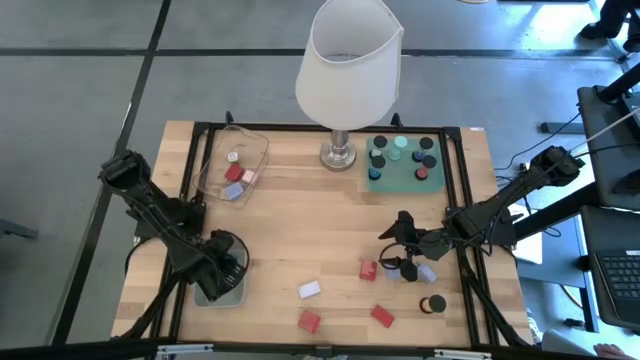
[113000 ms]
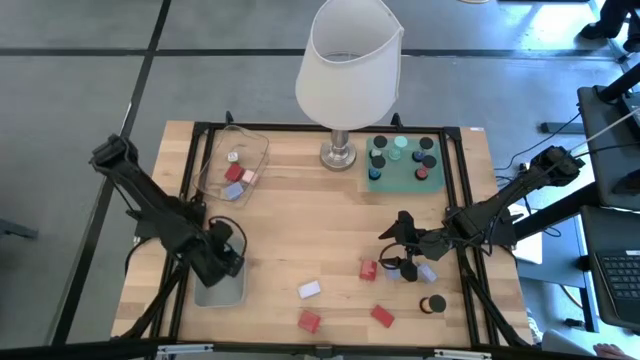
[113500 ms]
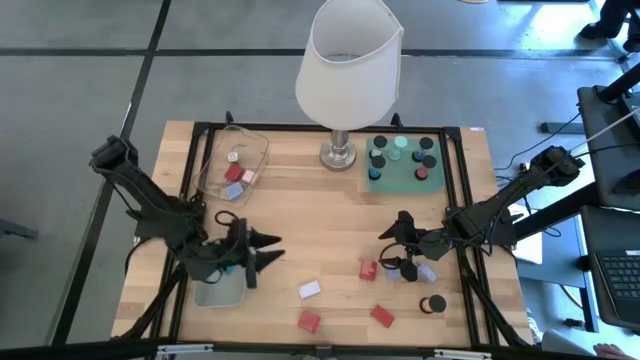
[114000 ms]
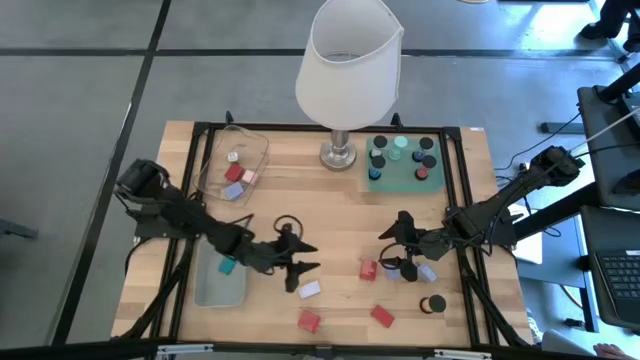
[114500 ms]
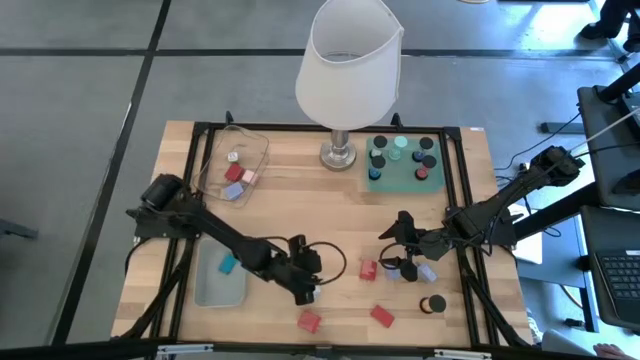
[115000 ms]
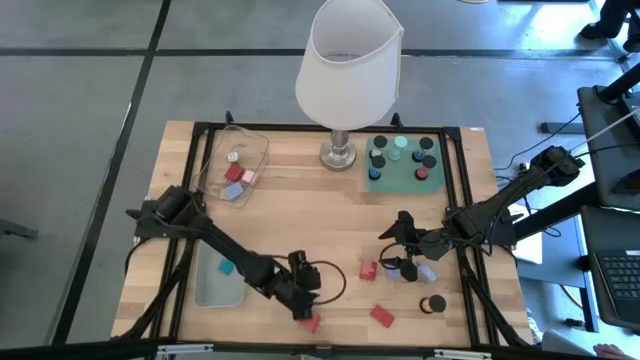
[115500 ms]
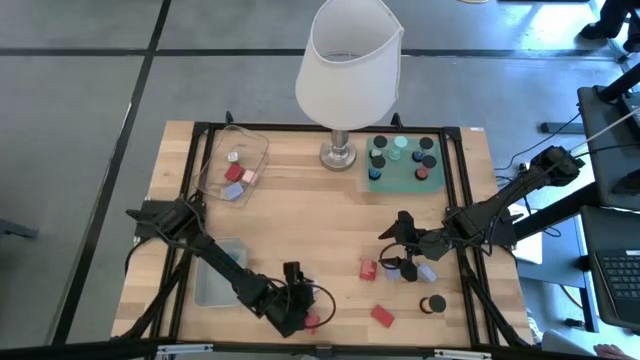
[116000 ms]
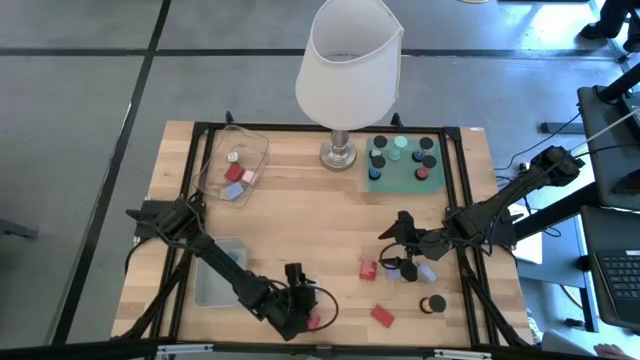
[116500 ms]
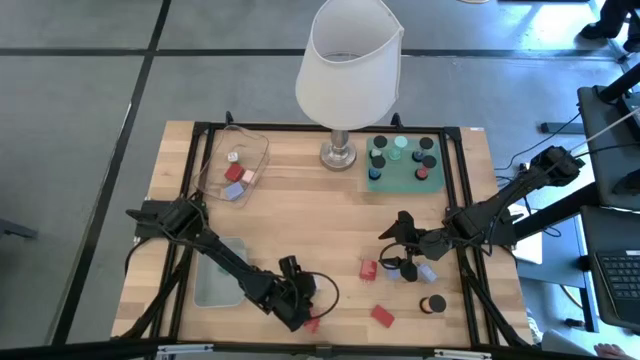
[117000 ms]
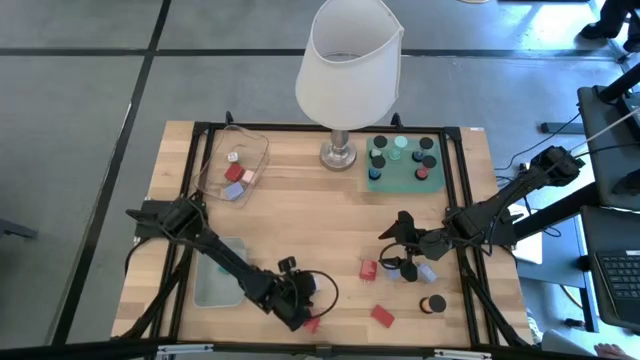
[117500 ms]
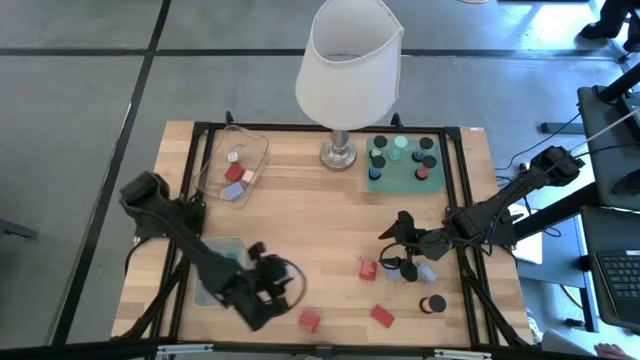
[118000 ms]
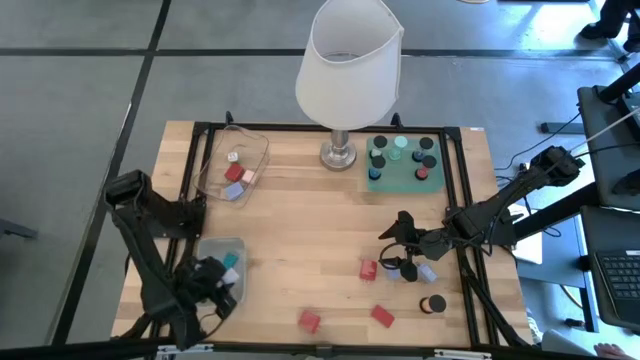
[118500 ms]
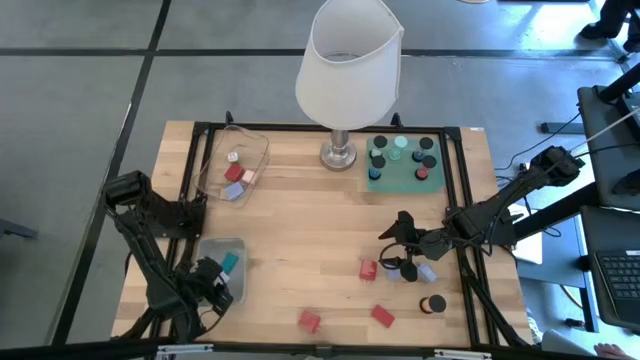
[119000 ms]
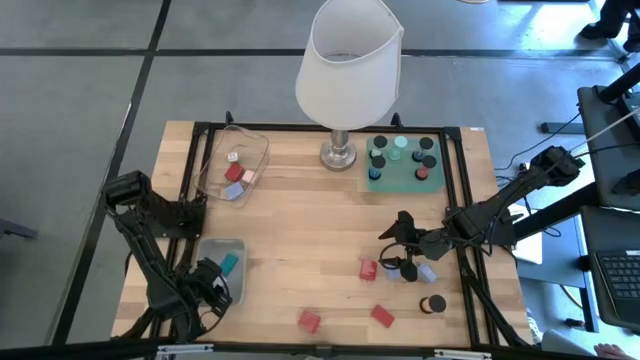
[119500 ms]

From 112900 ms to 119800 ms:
Task: Pick & Place Office items
Put the light blue digital timer into the gray bin

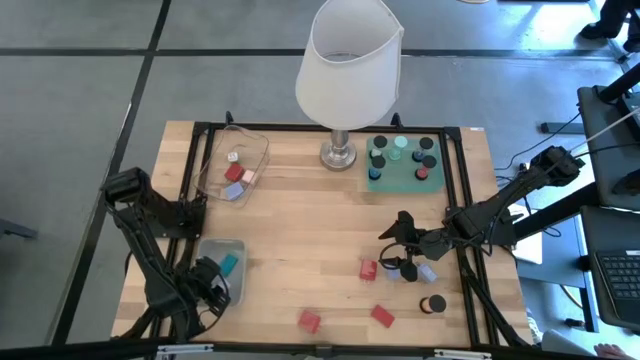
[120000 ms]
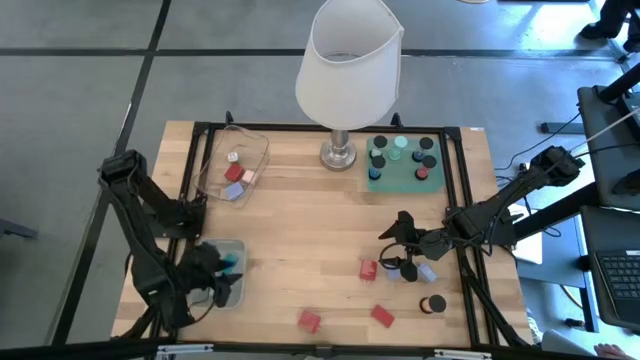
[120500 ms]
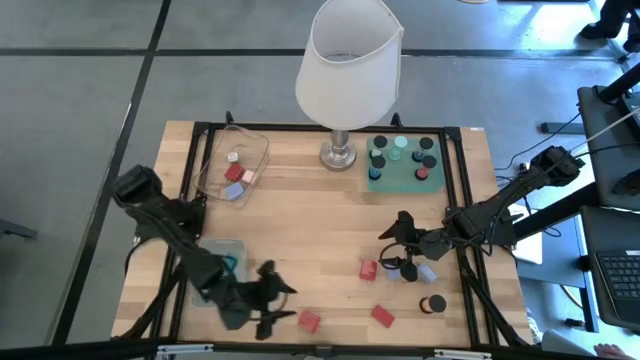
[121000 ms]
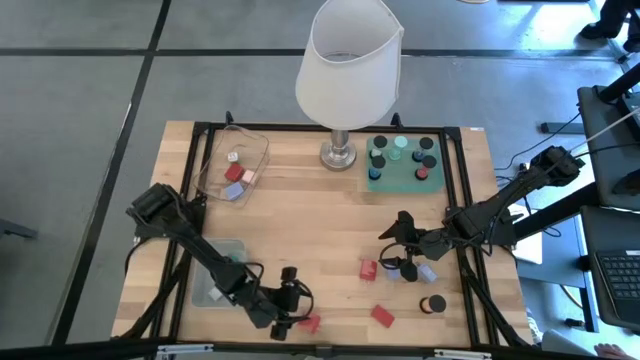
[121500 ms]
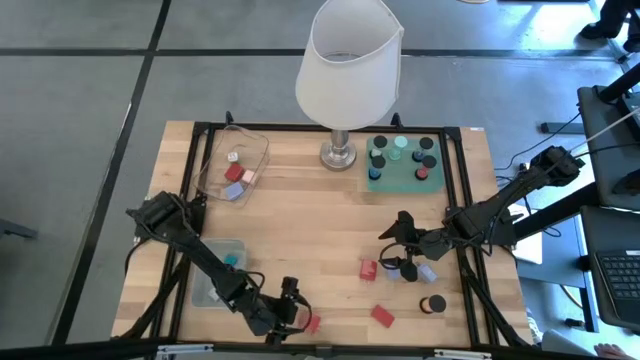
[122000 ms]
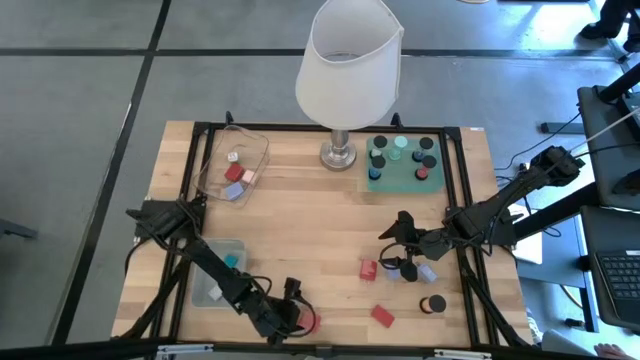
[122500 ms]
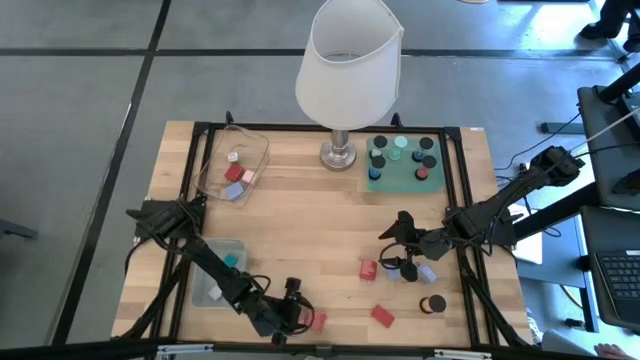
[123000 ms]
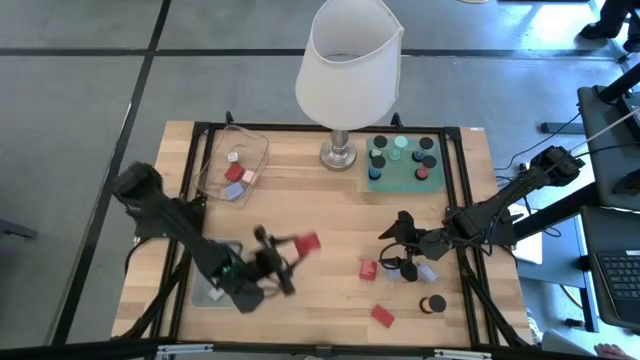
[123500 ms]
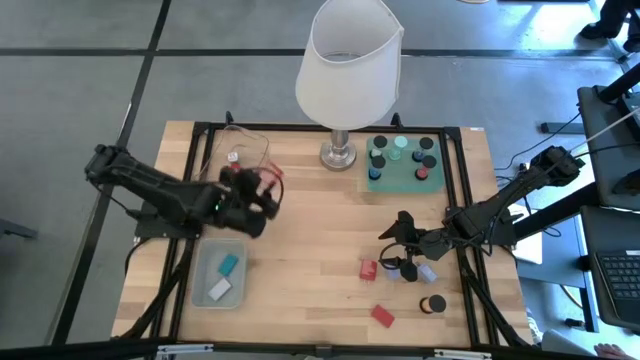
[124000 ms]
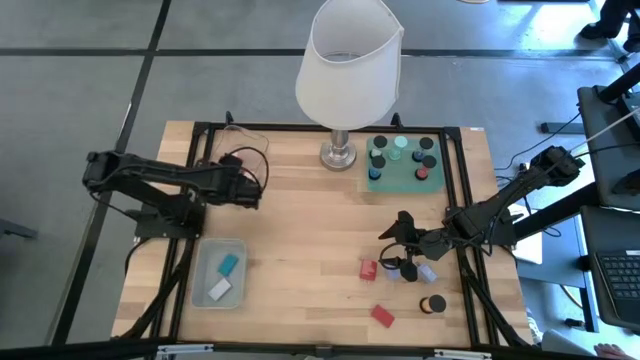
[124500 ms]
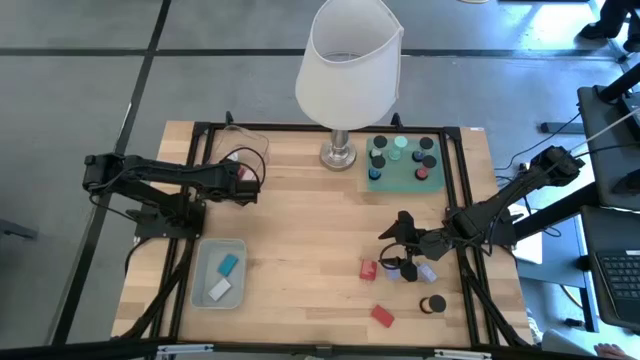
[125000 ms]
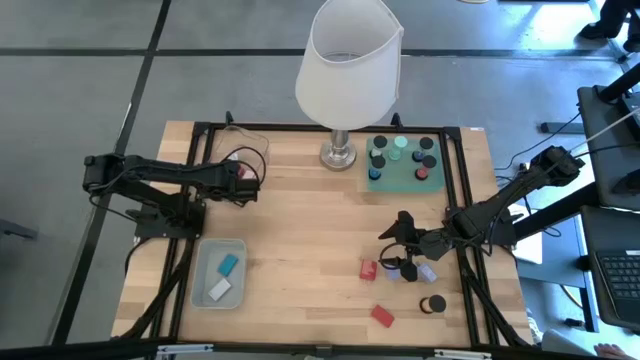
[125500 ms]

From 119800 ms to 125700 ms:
Put the red charger adapter into the transparent bin

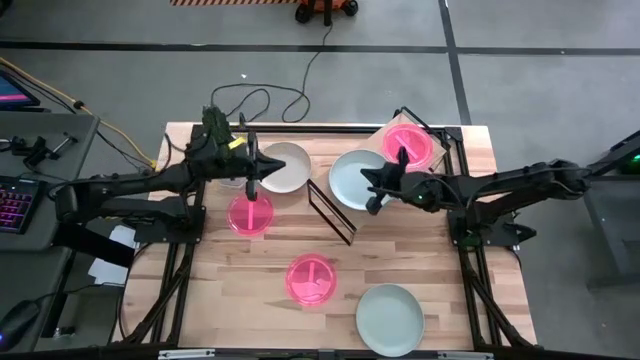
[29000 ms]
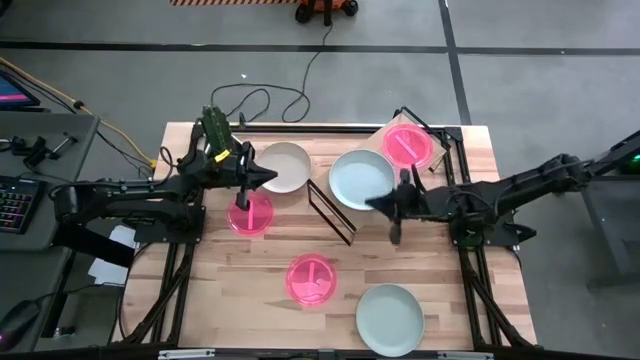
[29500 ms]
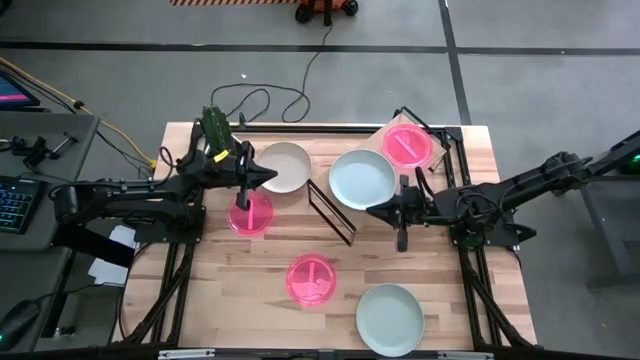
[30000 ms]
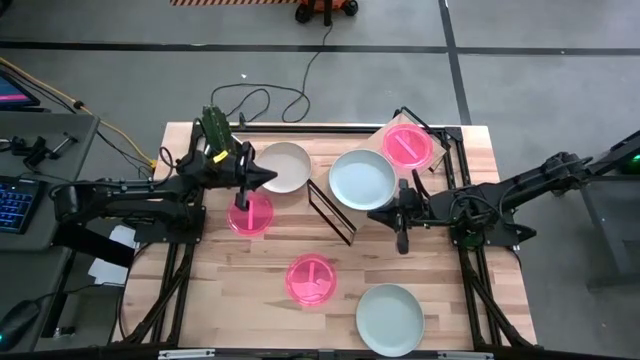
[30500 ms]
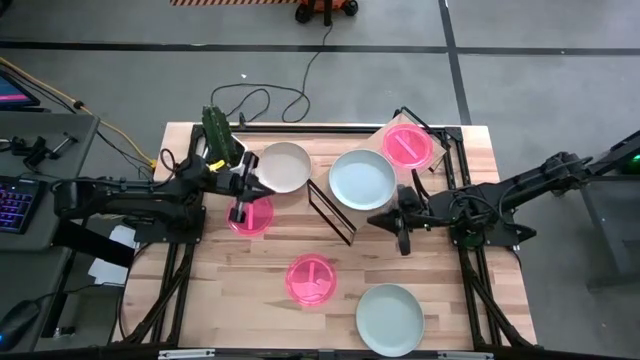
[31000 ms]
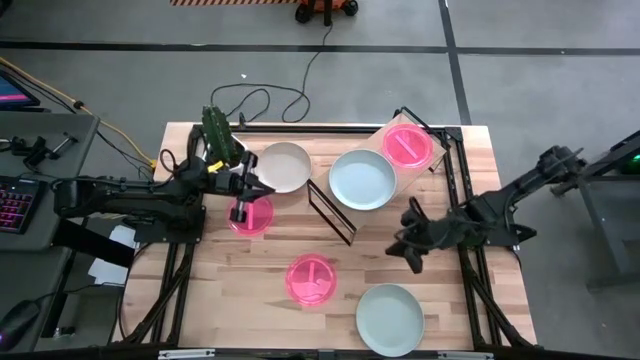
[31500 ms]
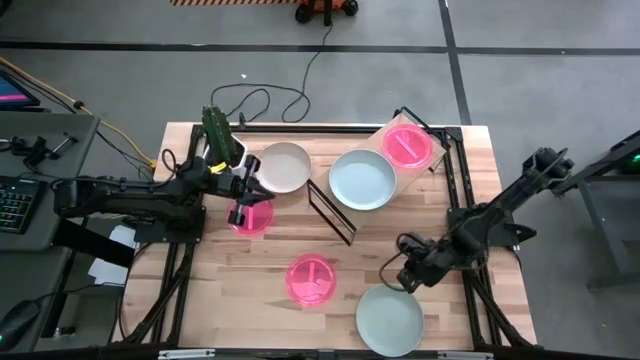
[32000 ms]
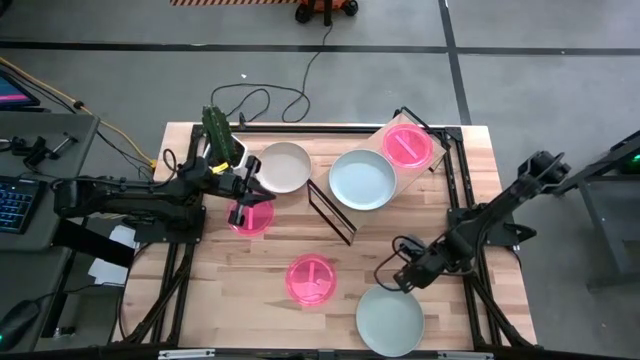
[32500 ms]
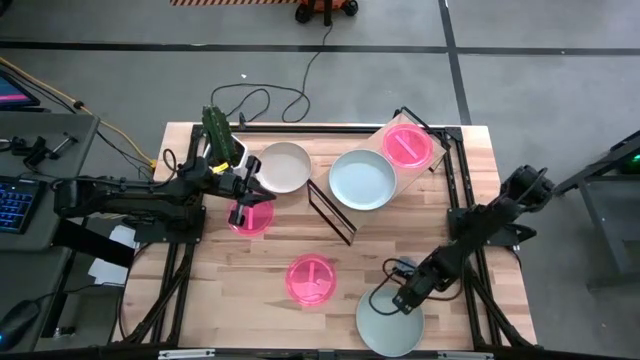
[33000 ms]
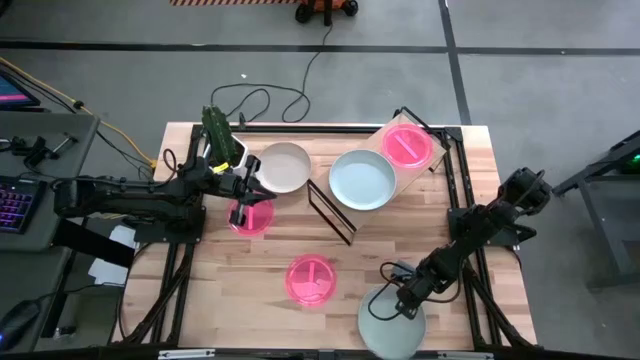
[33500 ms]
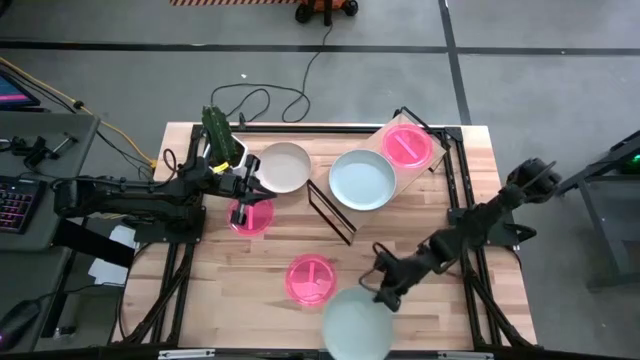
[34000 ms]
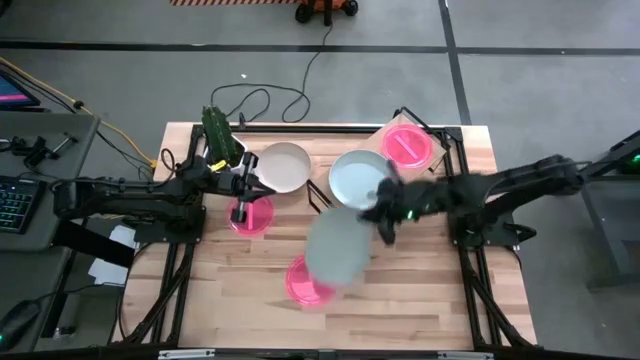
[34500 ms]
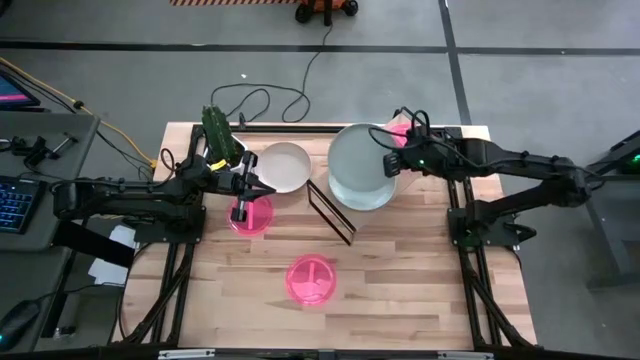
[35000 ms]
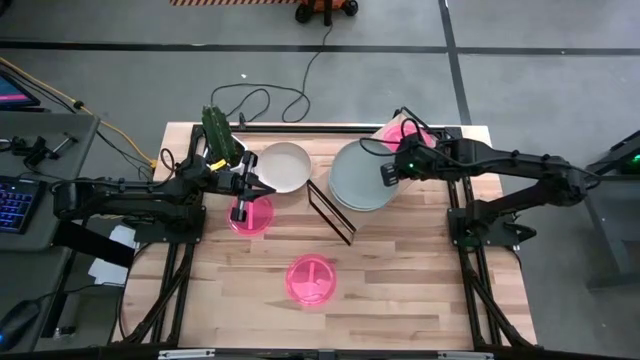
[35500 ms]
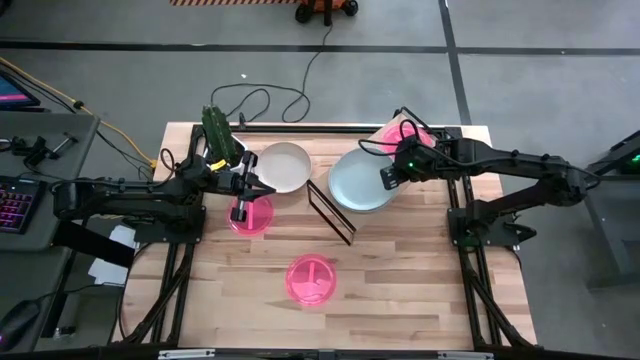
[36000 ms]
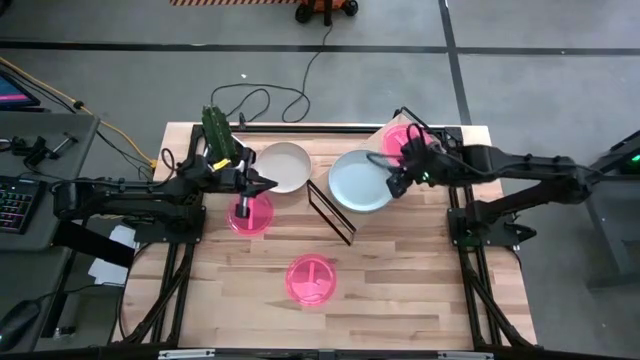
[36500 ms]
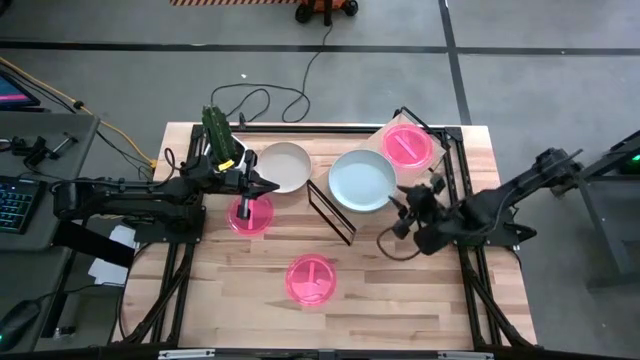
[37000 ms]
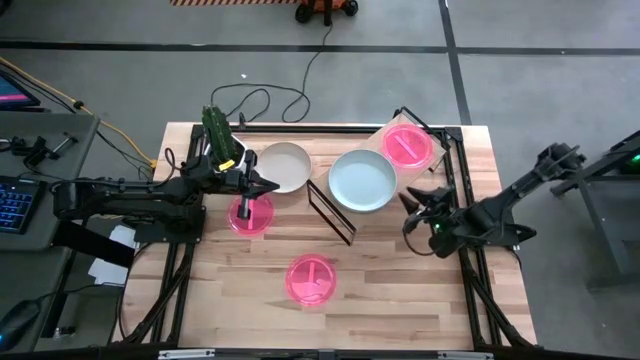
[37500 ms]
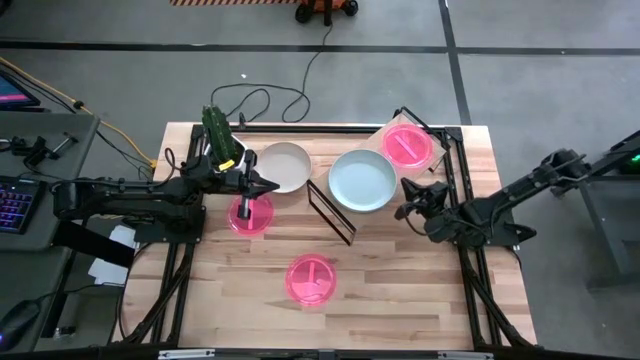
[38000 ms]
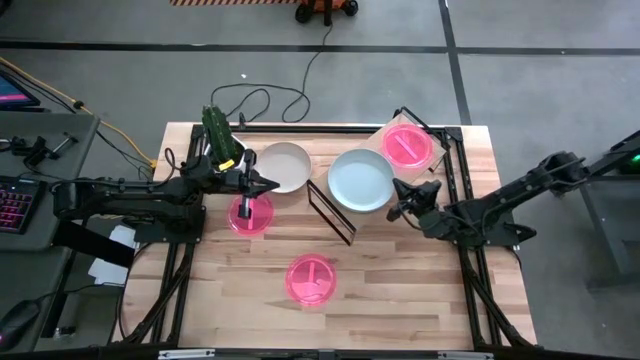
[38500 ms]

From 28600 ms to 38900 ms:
Task: Place and stack plates onto a shelf
Stack the blue plate on top of the blue plate on the shelf
